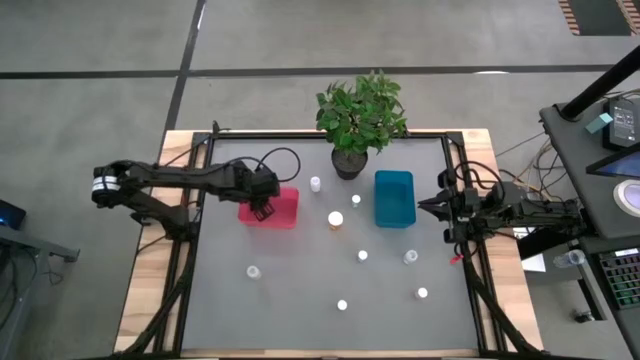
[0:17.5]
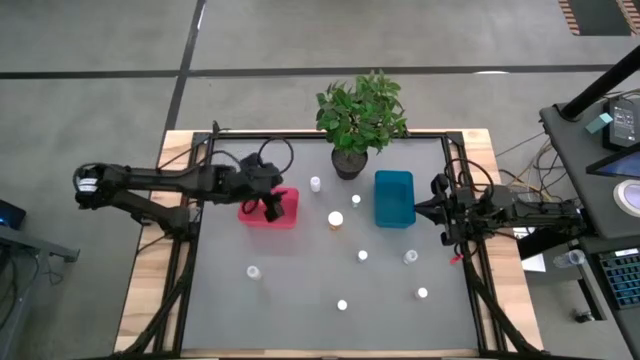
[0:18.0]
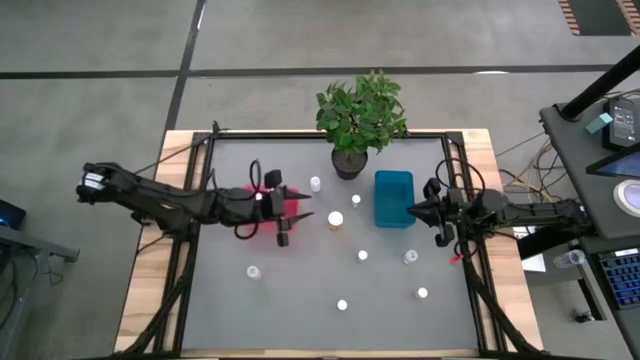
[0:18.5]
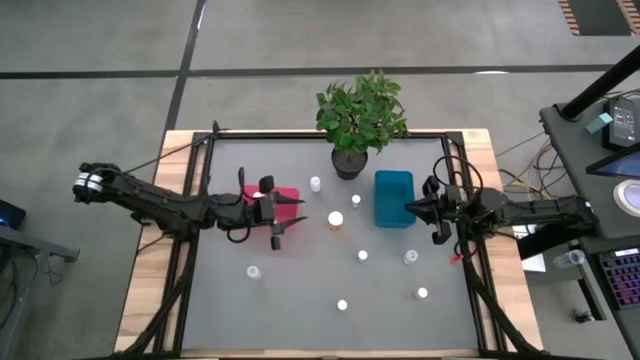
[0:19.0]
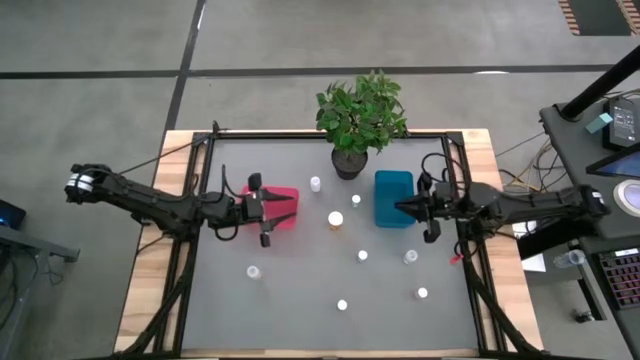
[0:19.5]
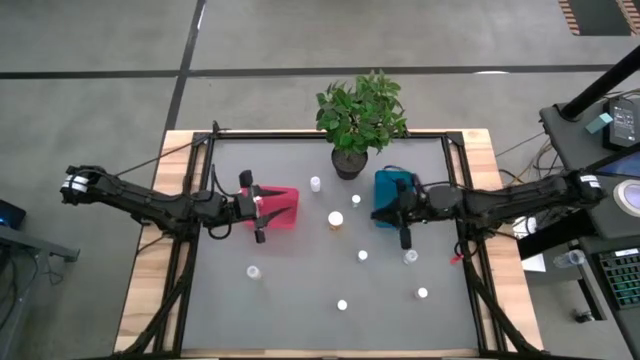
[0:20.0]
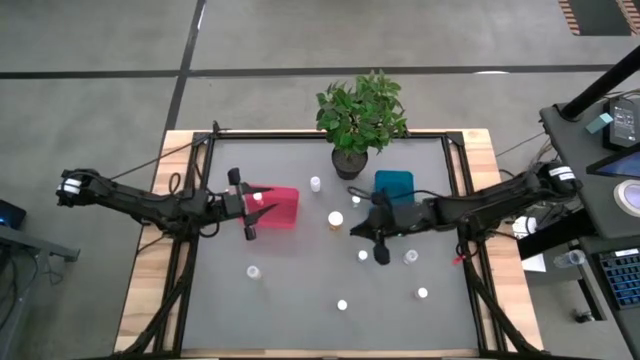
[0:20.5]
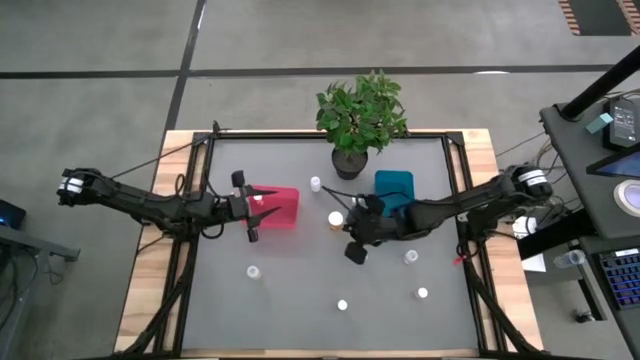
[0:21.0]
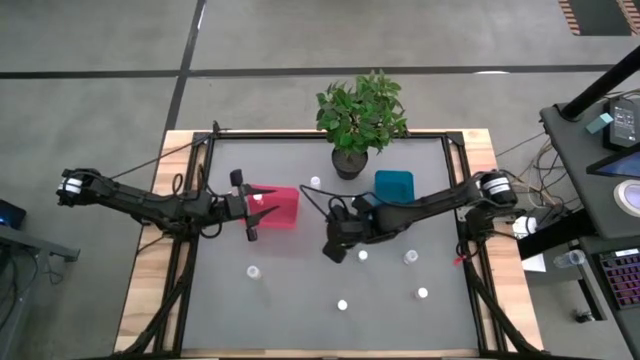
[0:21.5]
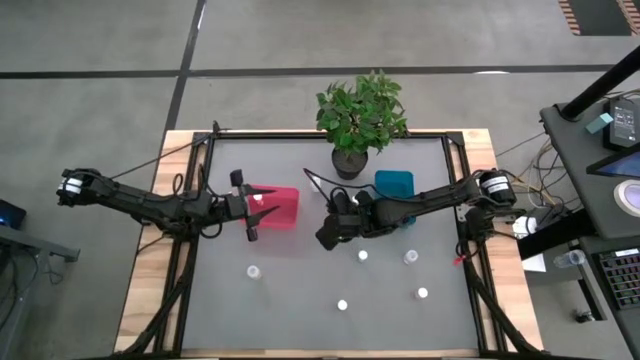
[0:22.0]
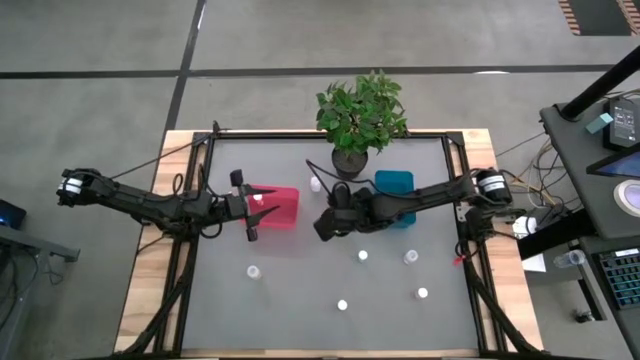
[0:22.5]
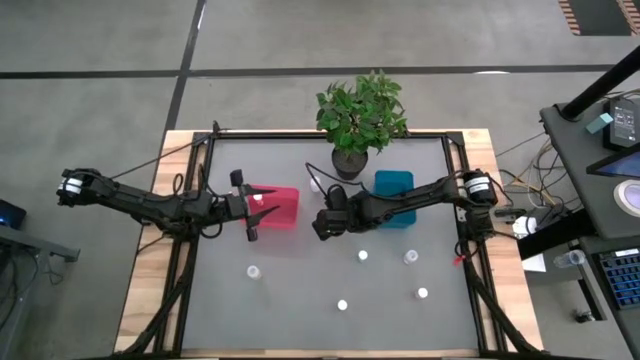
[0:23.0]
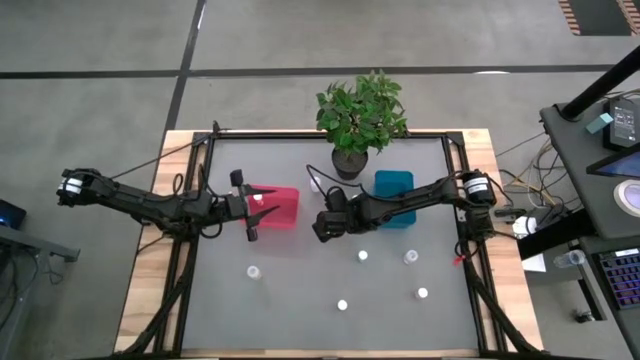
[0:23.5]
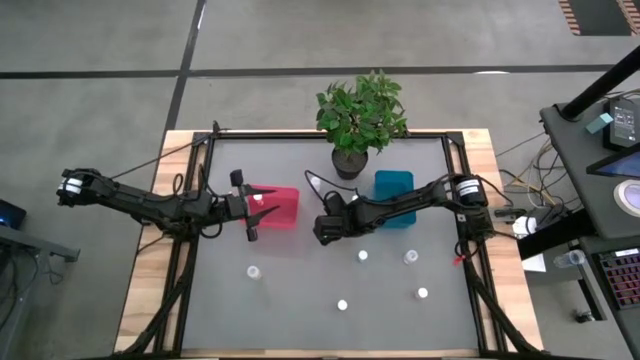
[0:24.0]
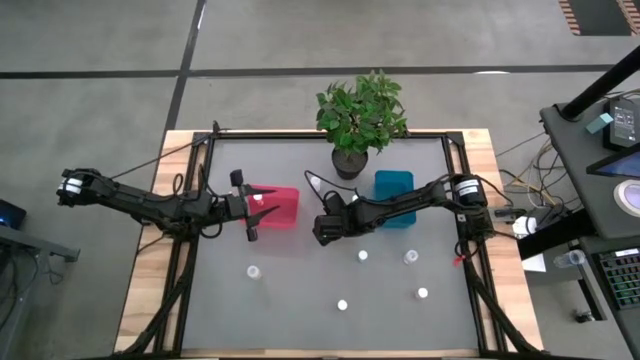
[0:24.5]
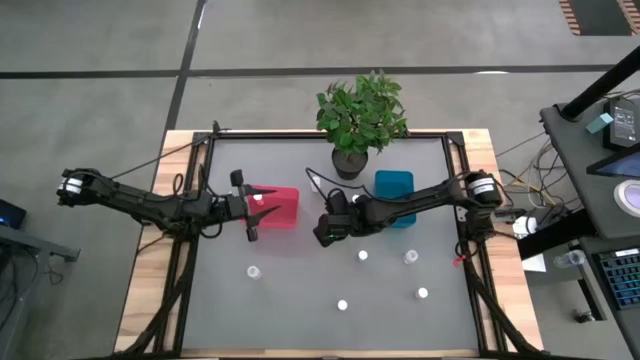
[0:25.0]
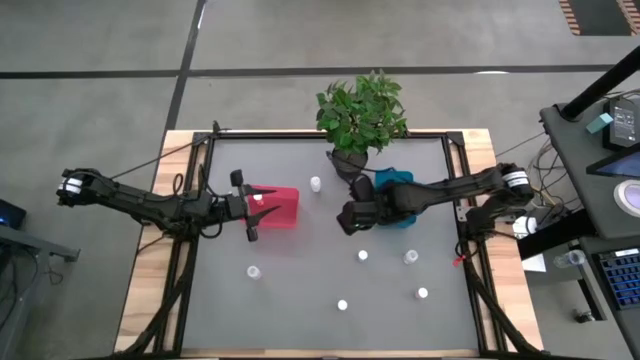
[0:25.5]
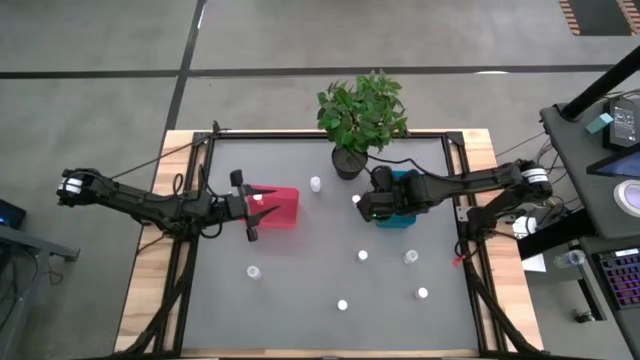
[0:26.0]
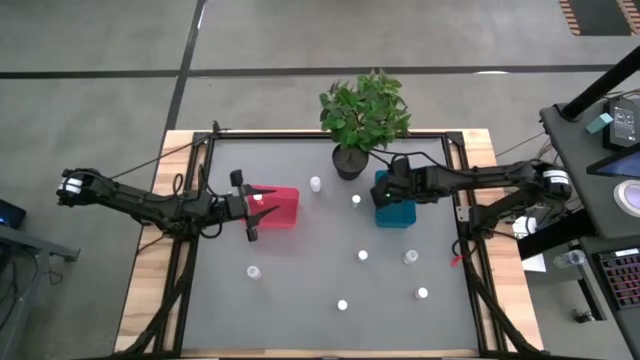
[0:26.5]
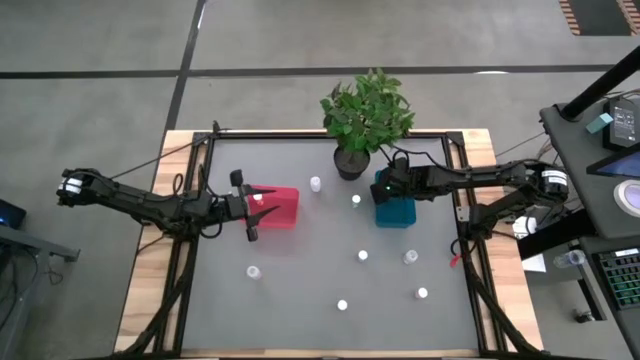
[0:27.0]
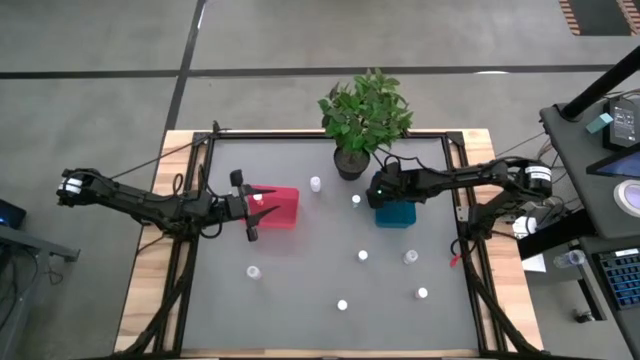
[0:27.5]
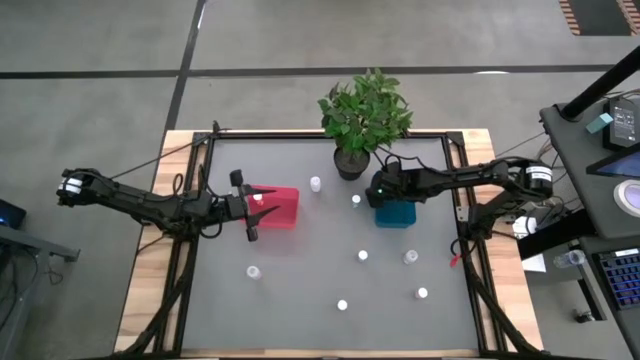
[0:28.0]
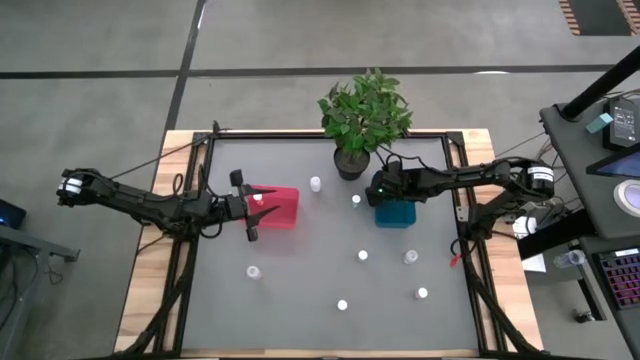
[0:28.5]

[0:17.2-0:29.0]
Task: Pick and place medicine bottles into bin by pill shape (circle, oval)
Put the large orange pill bottle into the blue bin

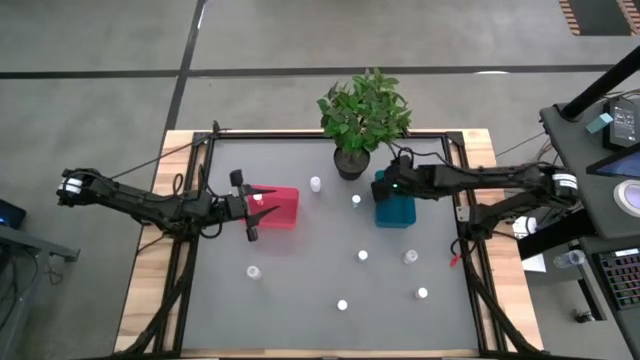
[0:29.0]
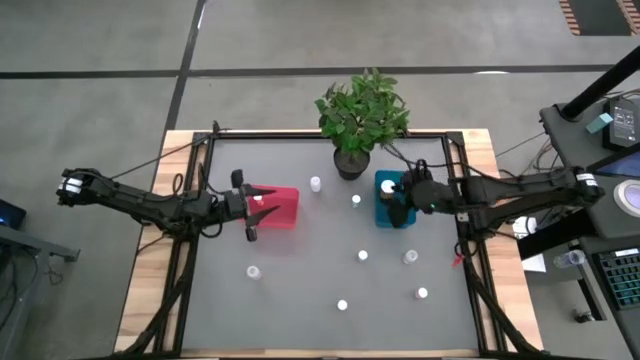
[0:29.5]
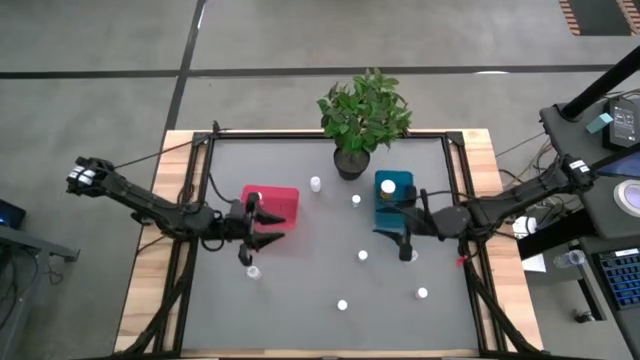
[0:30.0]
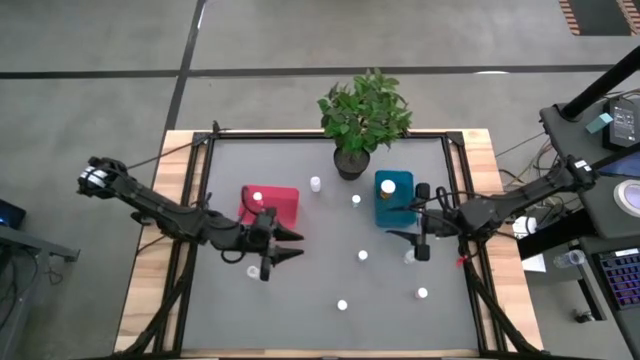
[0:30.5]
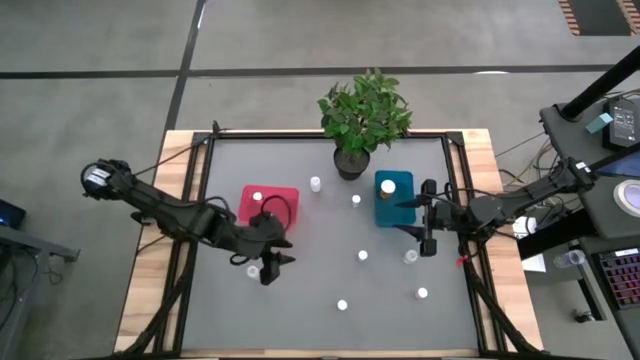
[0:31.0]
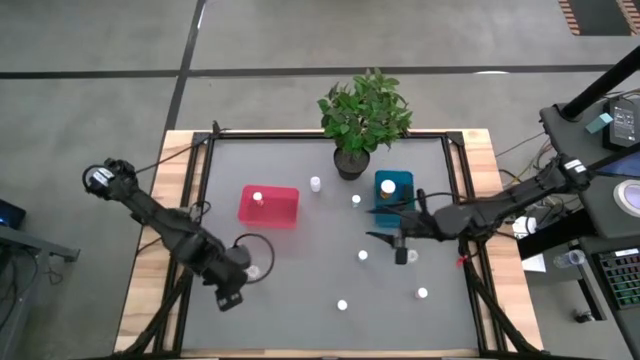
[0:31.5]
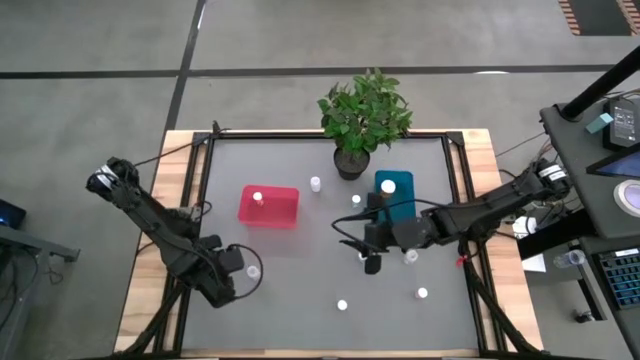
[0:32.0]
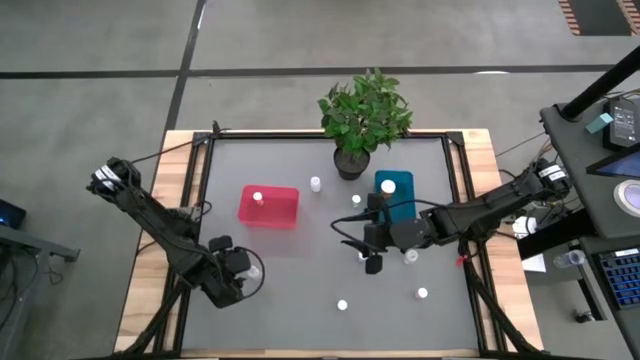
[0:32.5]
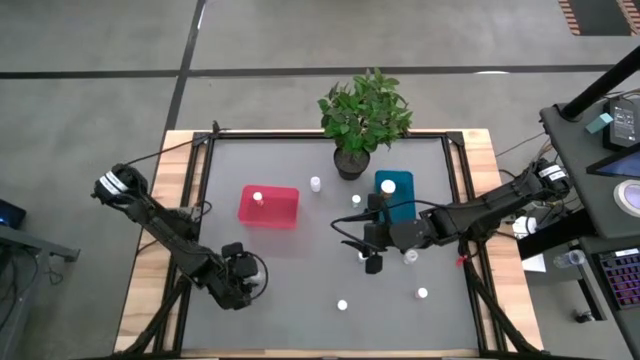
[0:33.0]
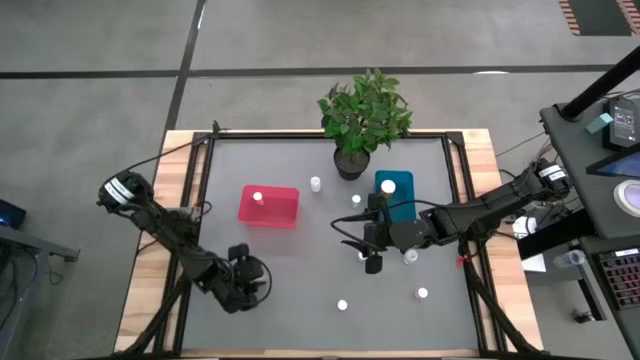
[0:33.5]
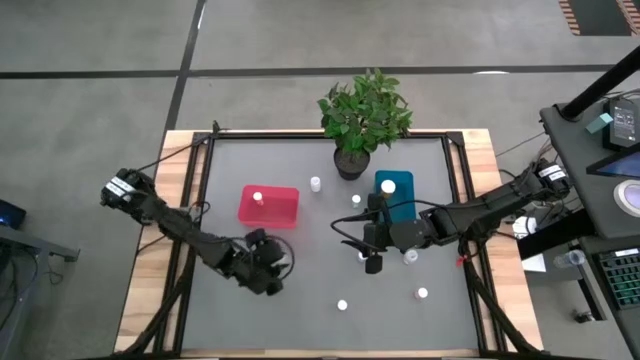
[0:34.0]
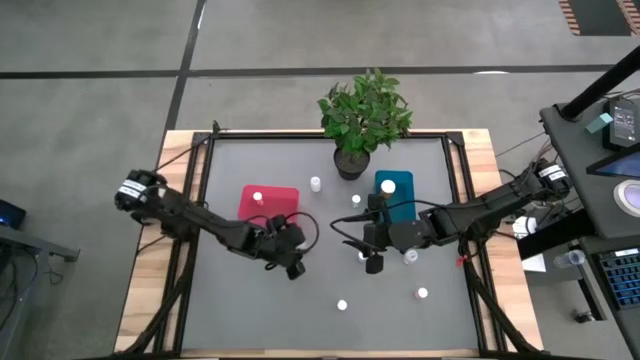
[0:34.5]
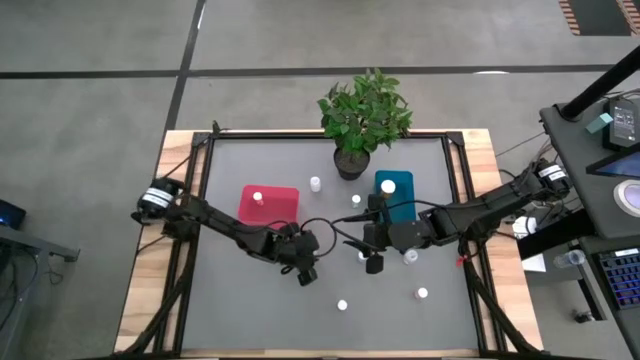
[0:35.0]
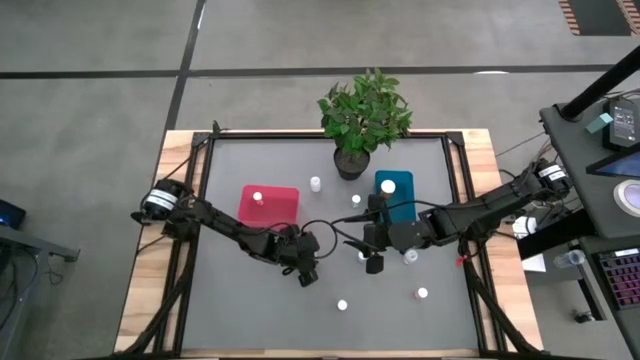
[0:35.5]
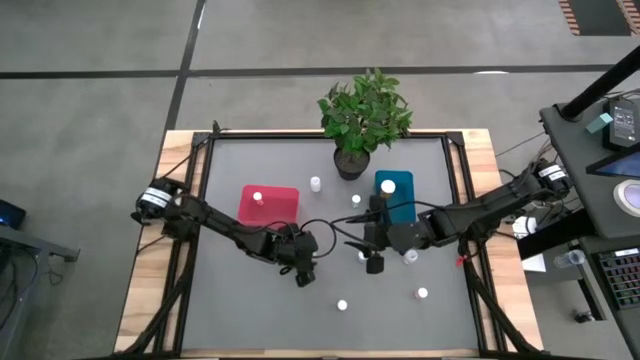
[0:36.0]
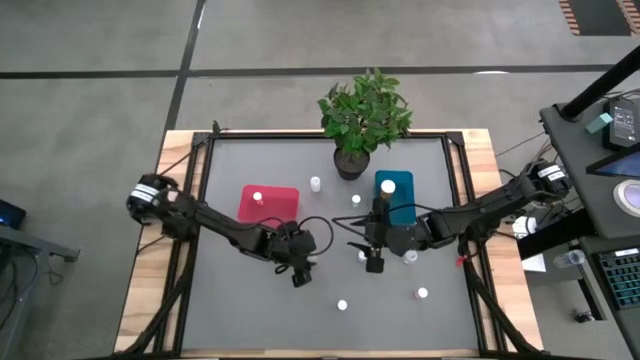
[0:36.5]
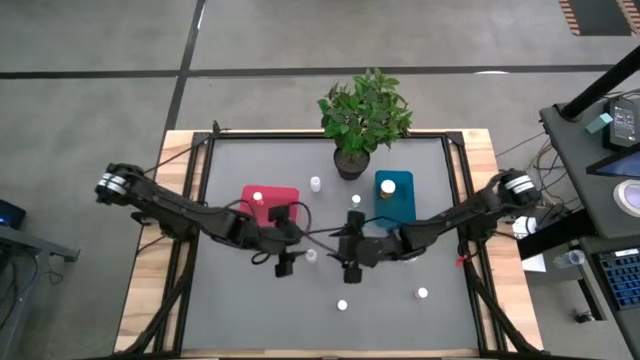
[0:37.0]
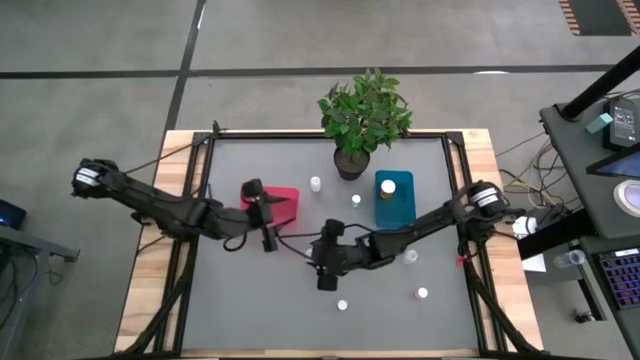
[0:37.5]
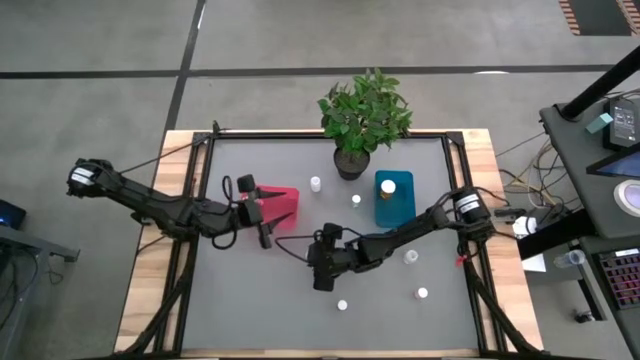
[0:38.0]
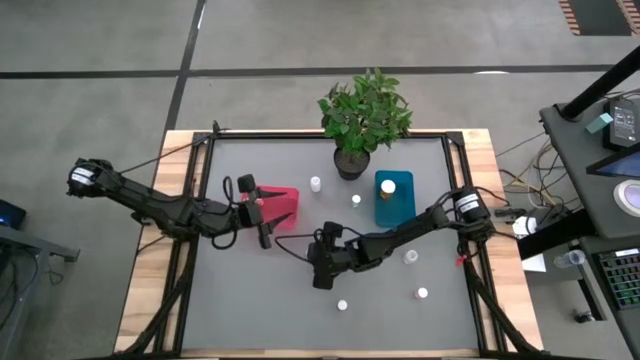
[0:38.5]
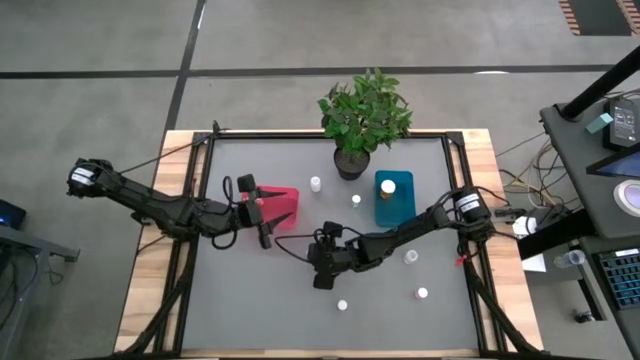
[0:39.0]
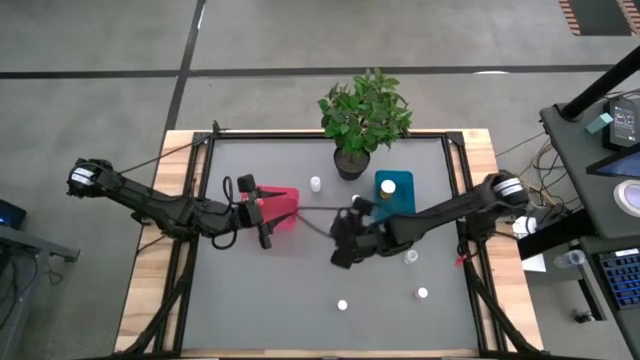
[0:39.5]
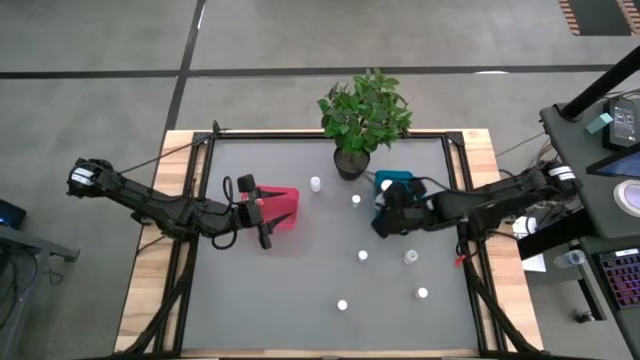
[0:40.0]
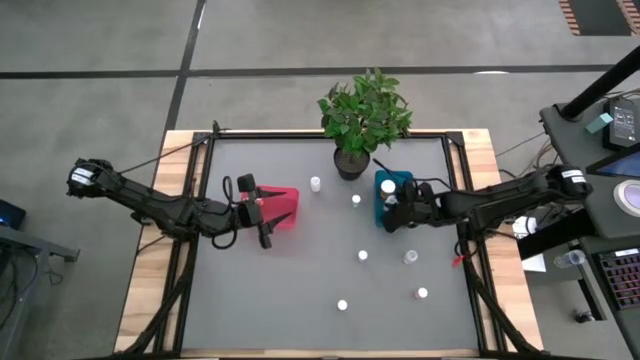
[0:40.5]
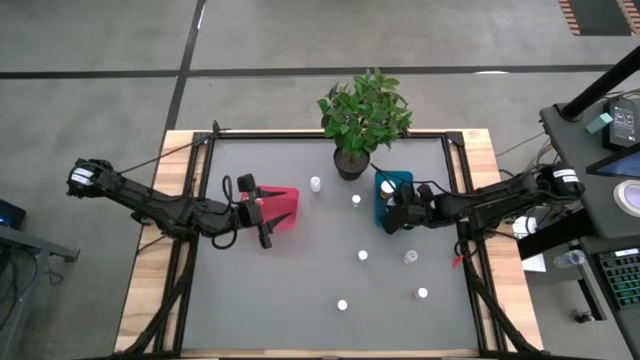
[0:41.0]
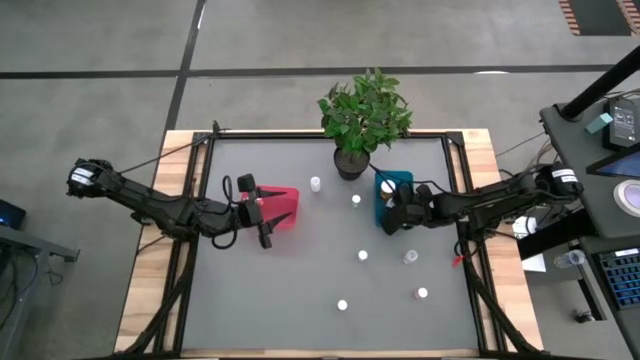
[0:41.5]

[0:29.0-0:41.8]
Put the large transparent pill bottle into the blue bin
